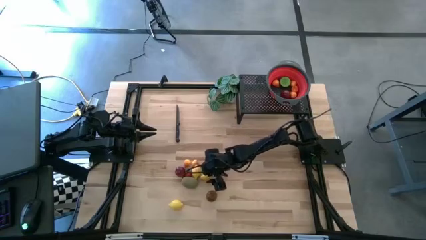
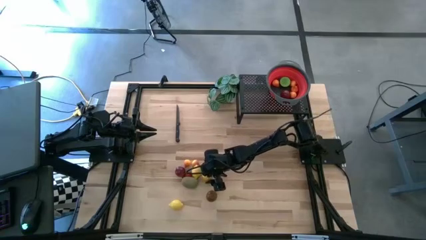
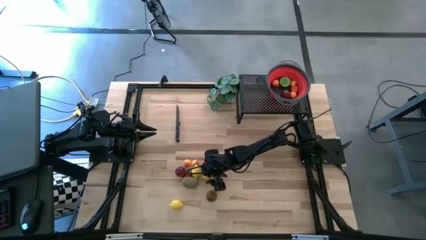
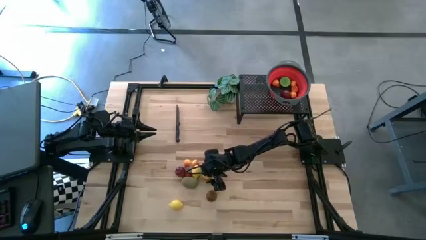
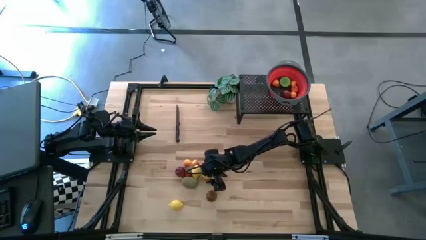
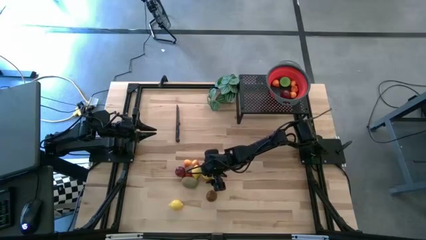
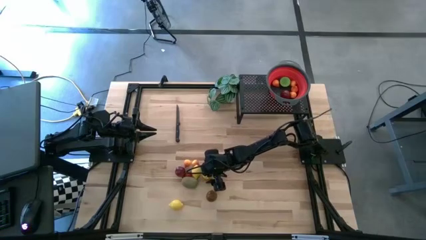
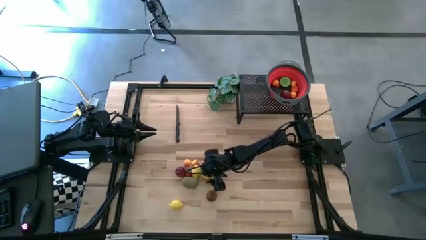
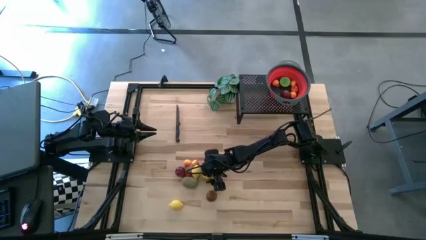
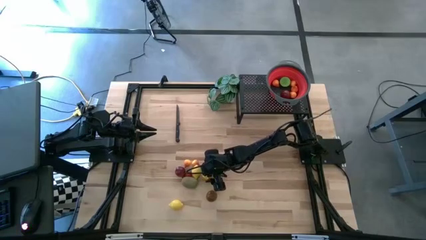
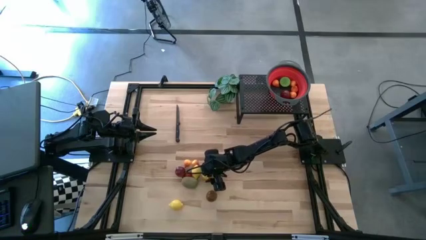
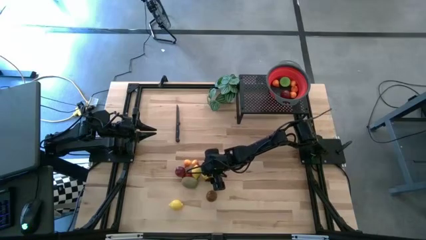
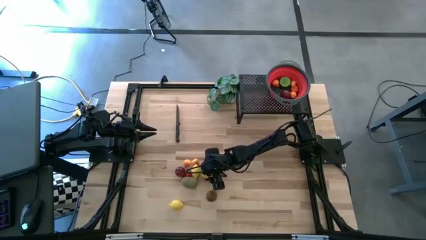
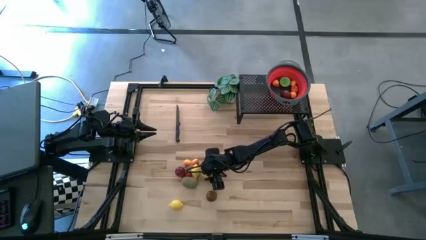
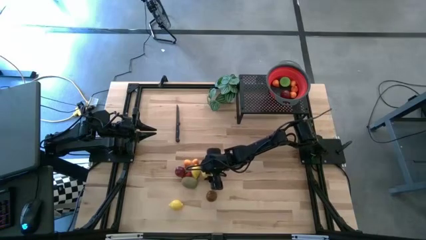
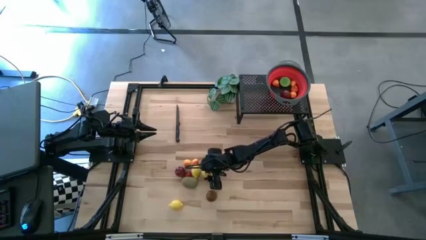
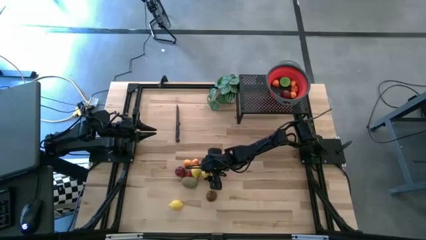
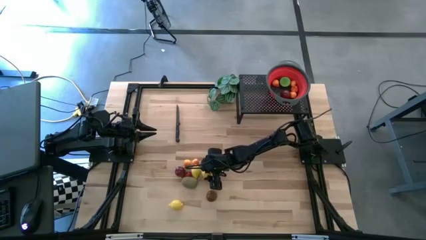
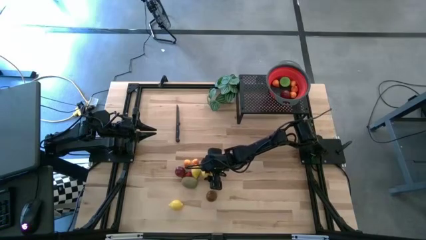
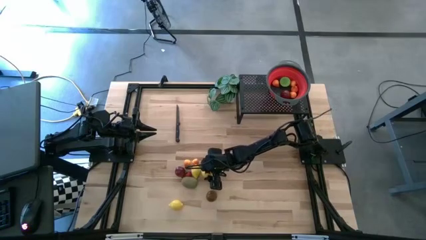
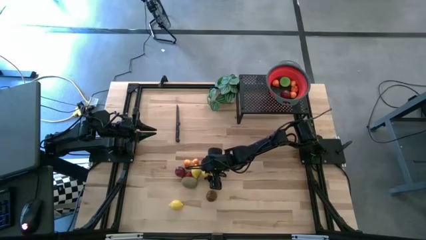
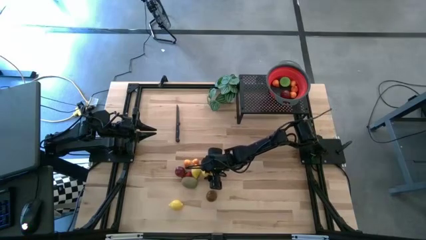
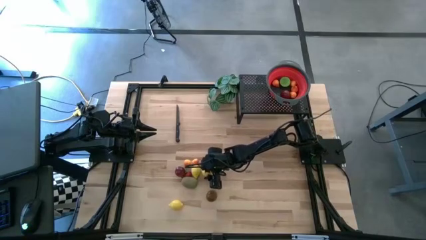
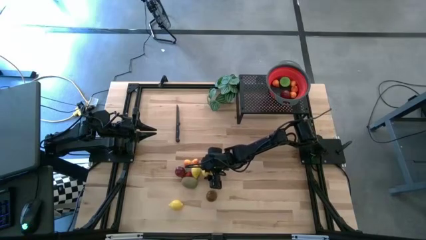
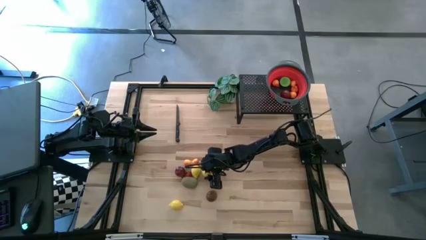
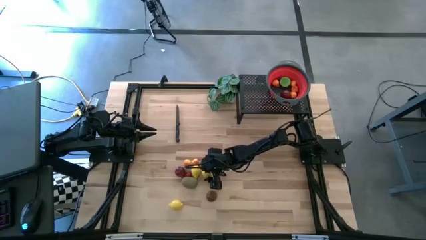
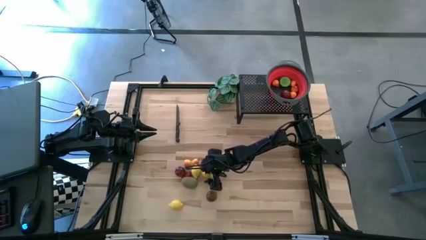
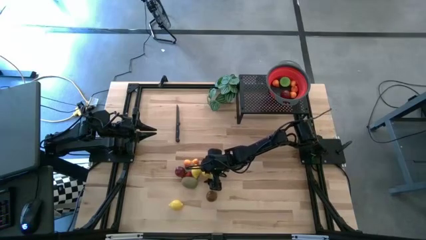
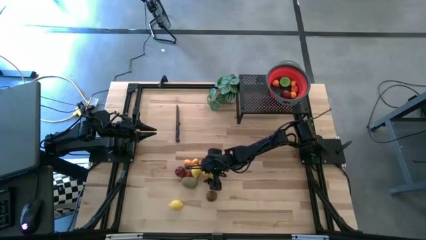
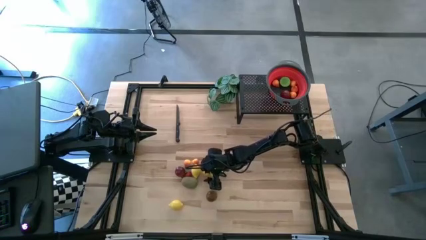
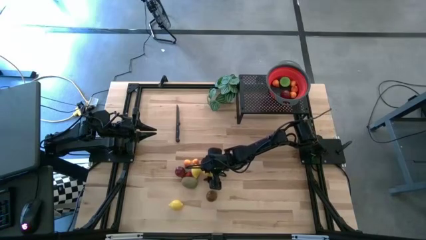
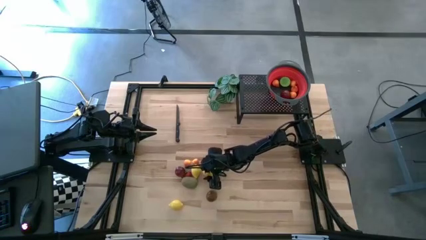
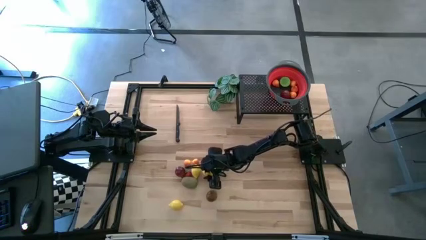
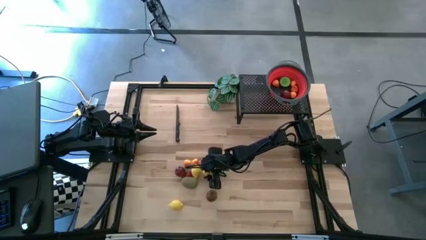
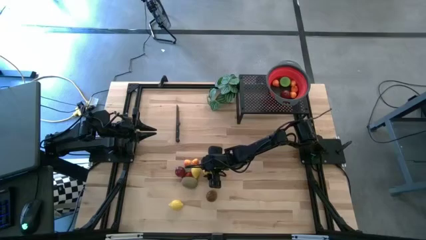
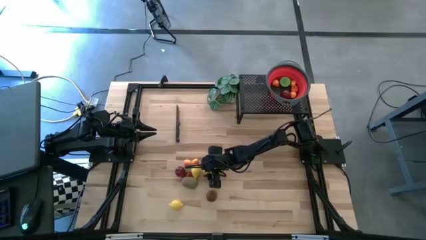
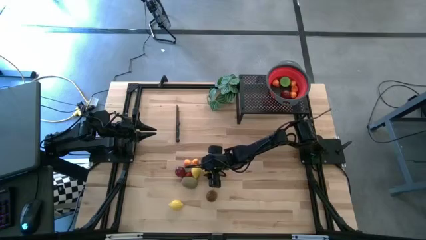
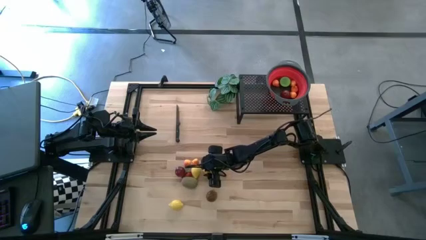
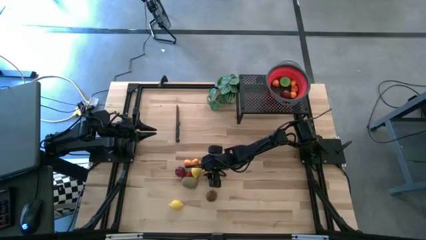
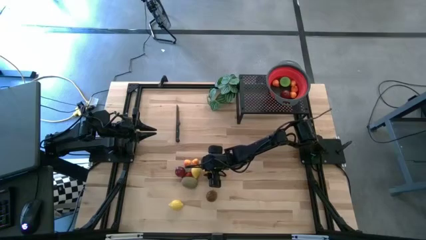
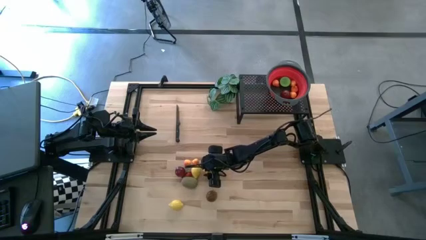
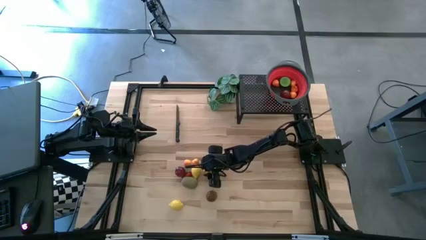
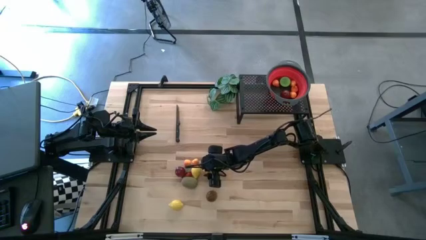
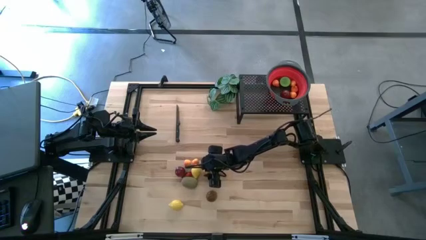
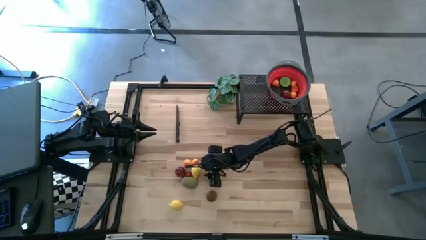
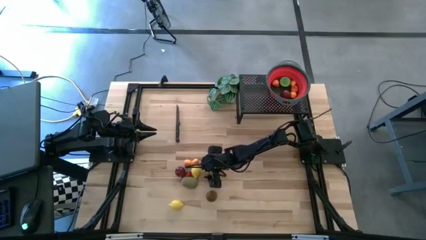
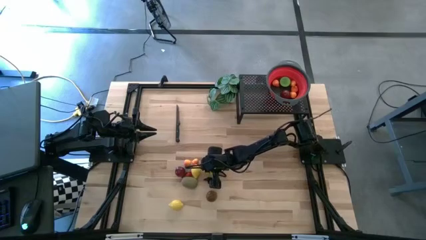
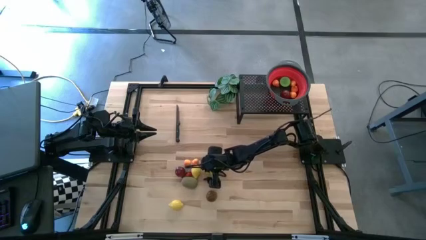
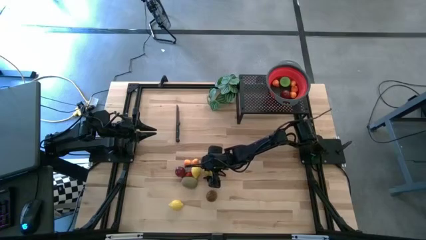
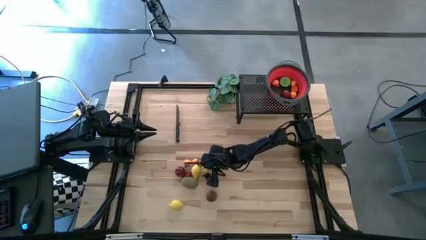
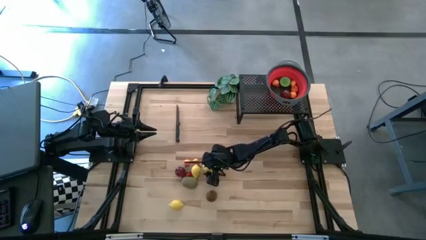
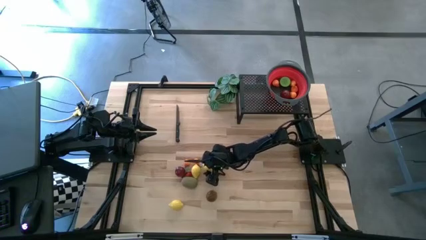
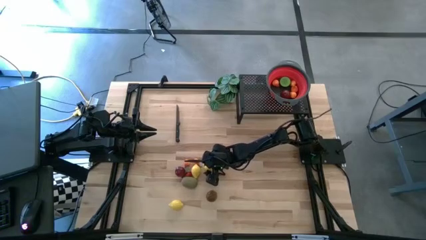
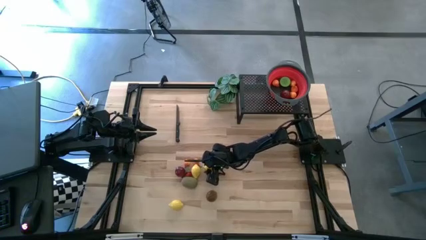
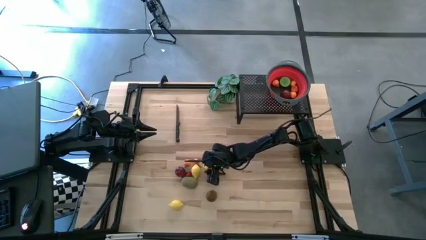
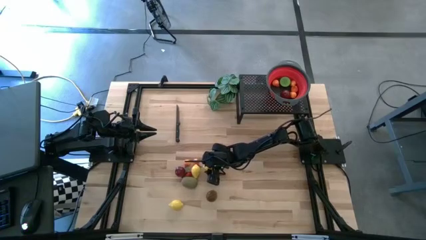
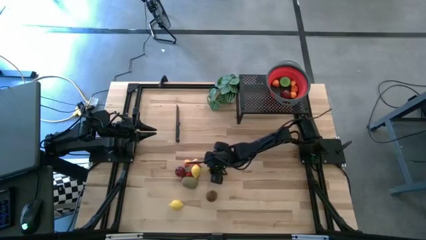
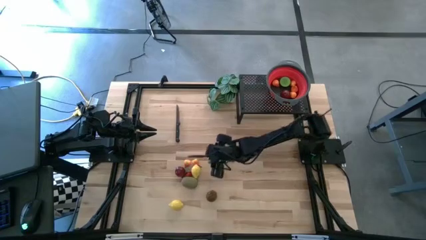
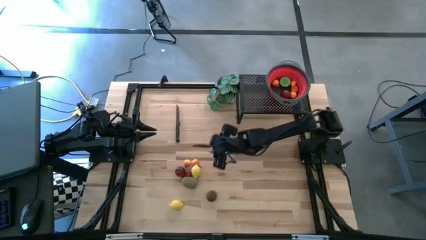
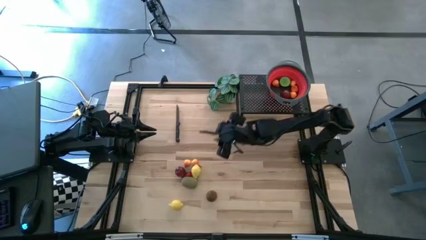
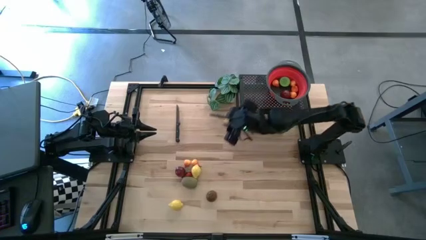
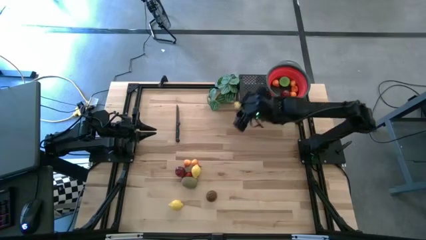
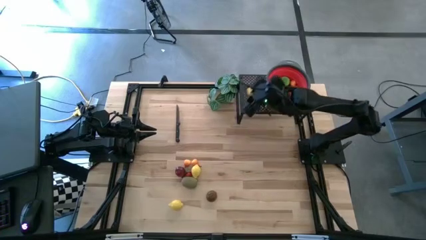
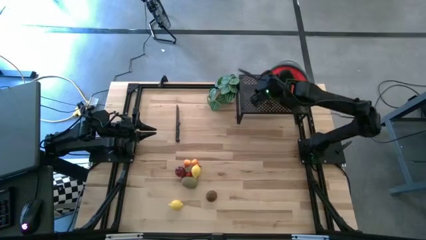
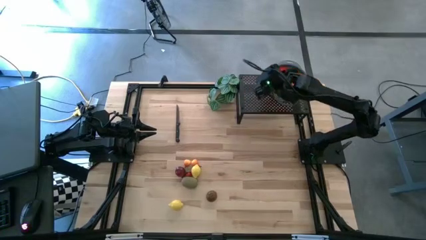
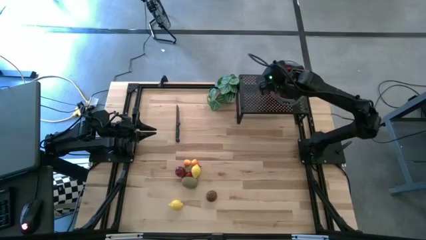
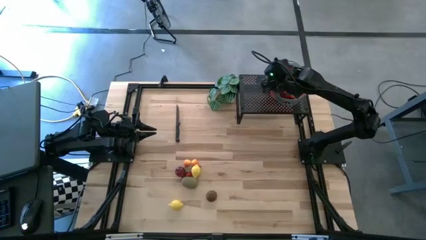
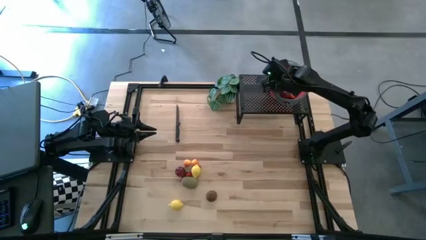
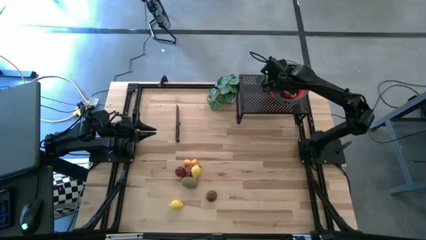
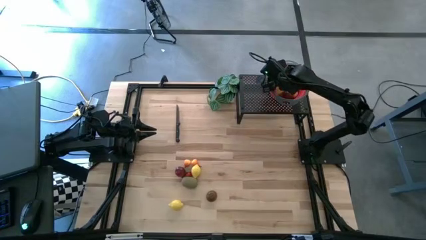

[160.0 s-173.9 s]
Task: Pick & Place Fruit
Put the yellow lemon into the red strainer bowl

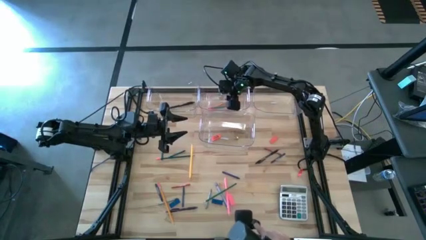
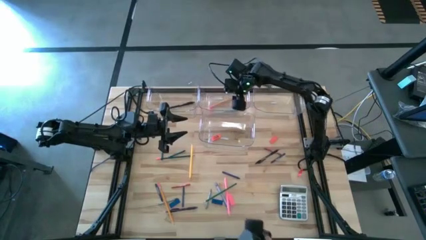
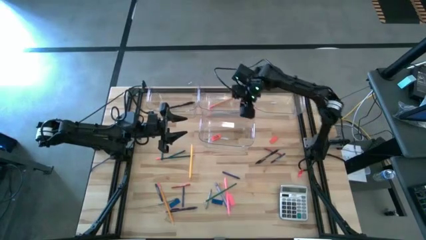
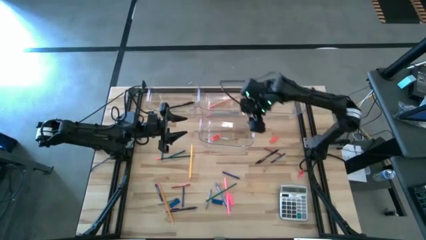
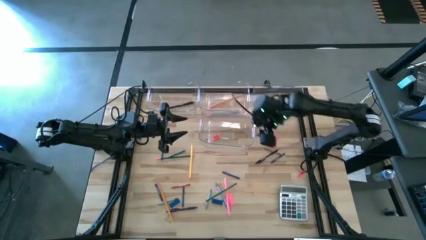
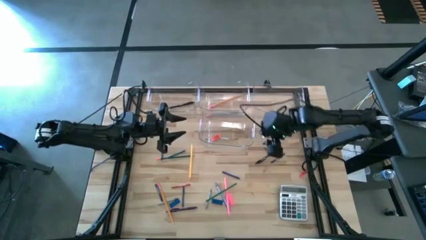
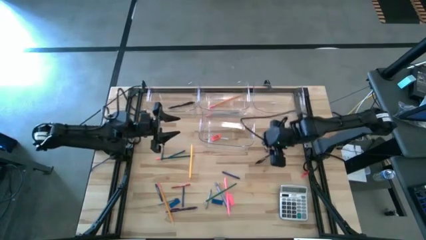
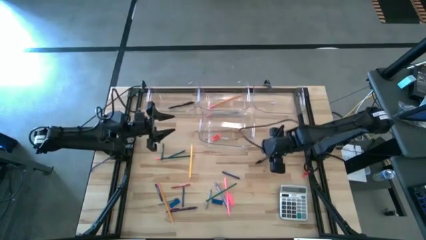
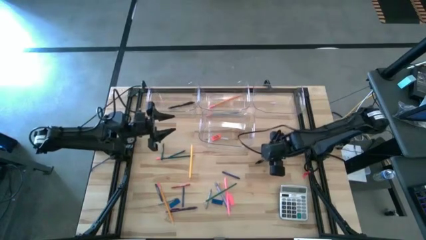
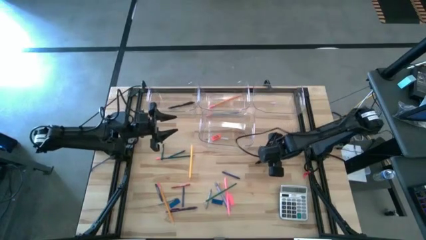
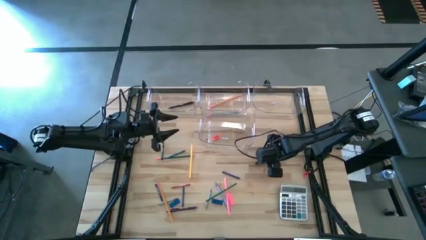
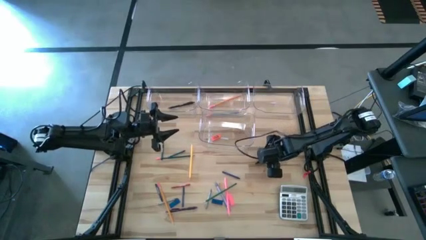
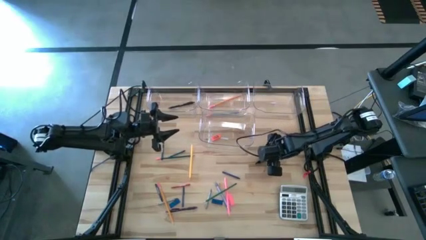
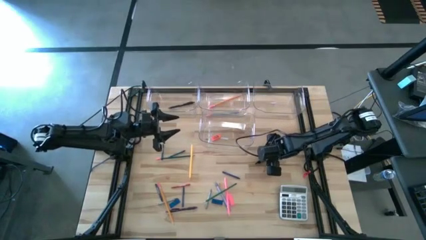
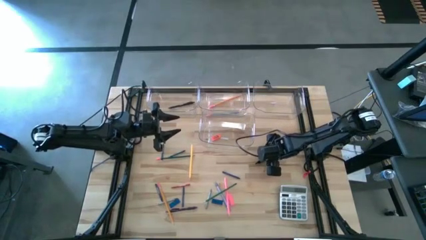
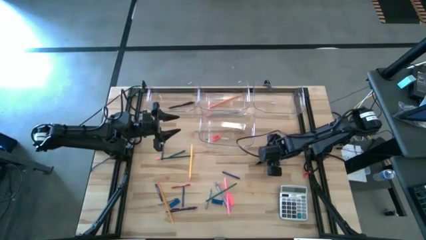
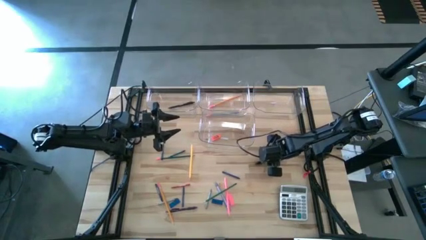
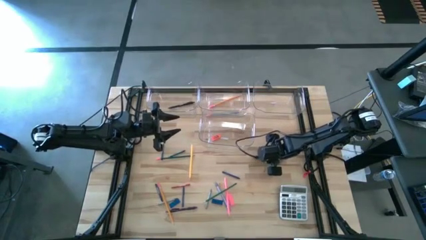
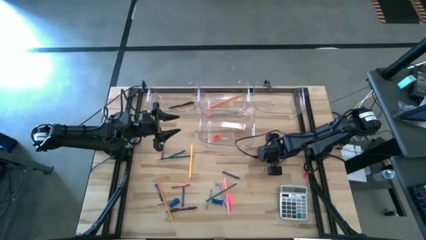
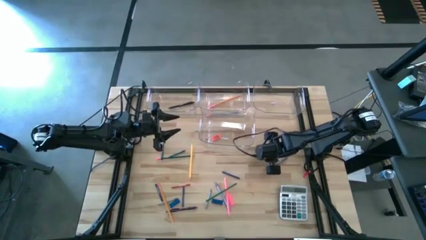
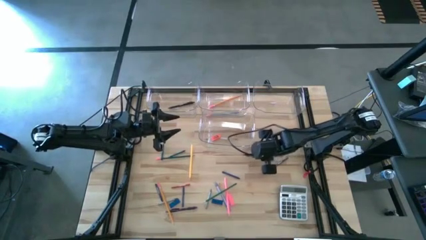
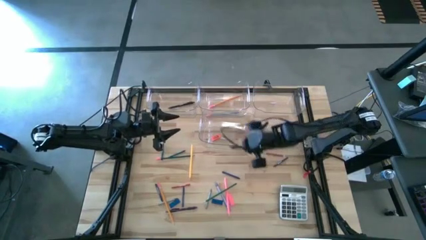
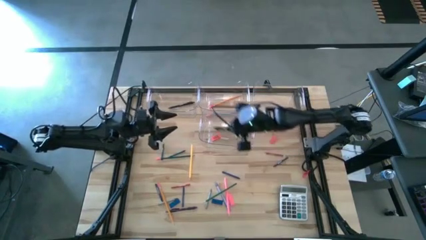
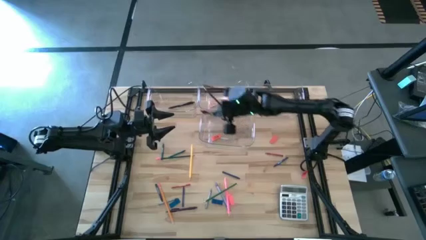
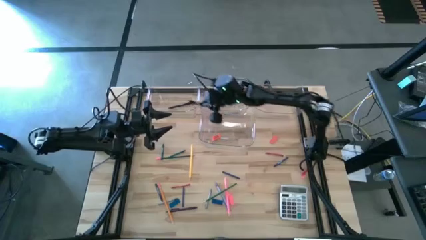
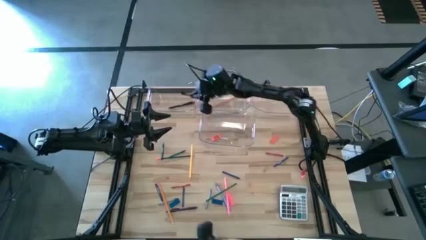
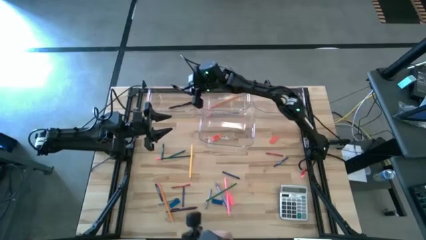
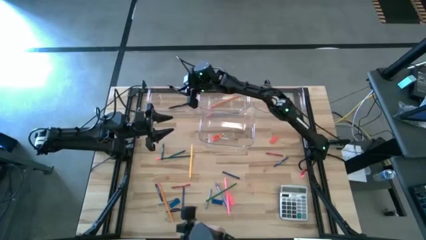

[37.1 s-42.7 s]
Task: Sort crayons/erasers/pens/pencils in bins
Put the black pen into the top left transparent bin
